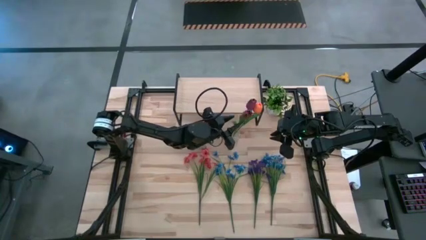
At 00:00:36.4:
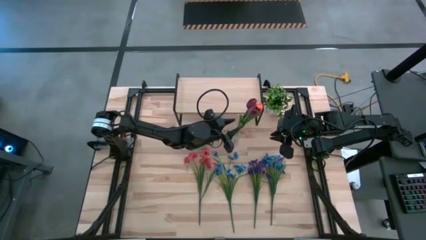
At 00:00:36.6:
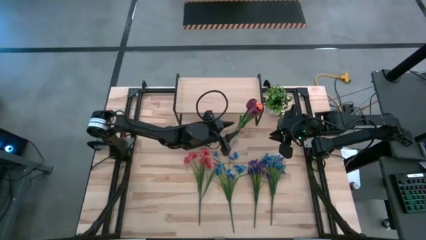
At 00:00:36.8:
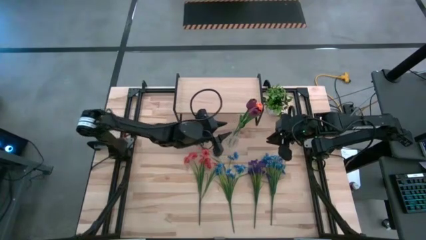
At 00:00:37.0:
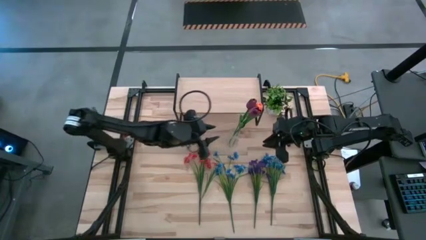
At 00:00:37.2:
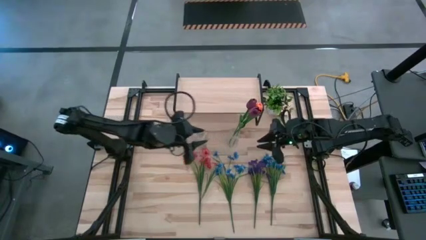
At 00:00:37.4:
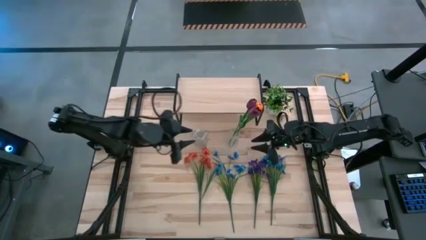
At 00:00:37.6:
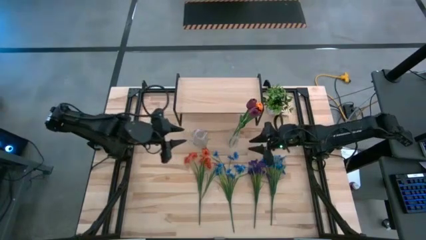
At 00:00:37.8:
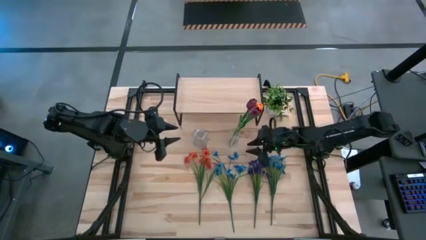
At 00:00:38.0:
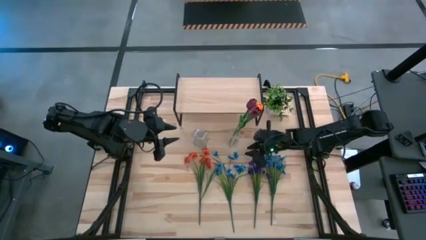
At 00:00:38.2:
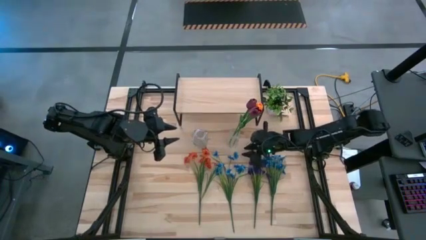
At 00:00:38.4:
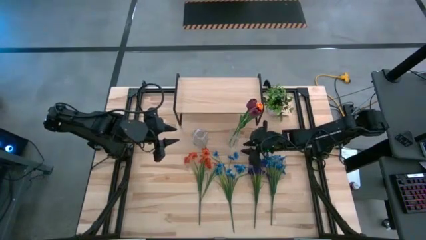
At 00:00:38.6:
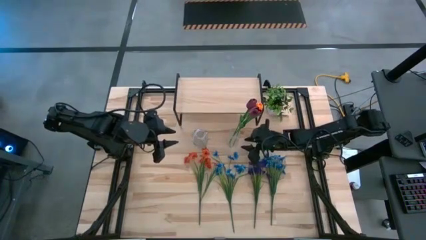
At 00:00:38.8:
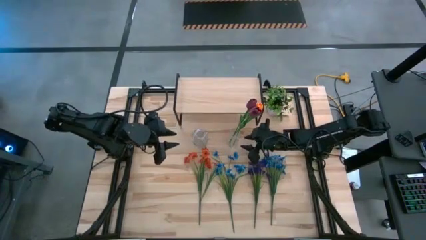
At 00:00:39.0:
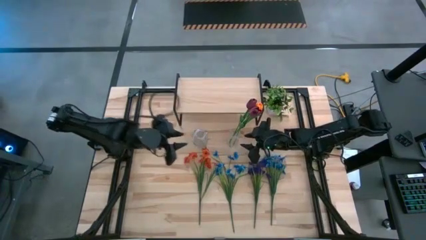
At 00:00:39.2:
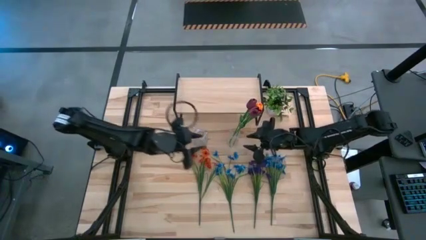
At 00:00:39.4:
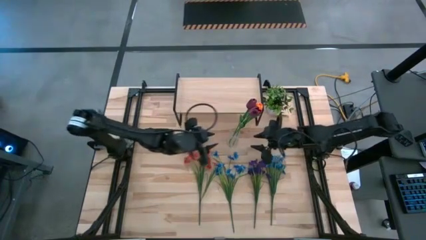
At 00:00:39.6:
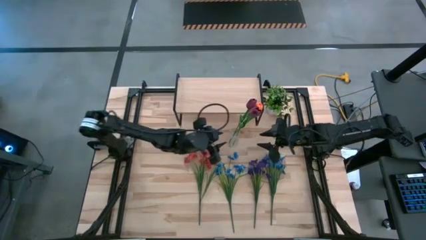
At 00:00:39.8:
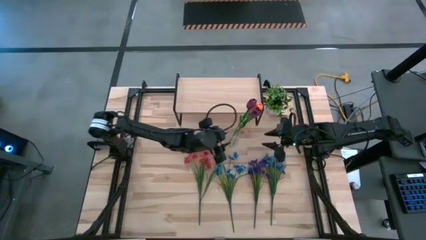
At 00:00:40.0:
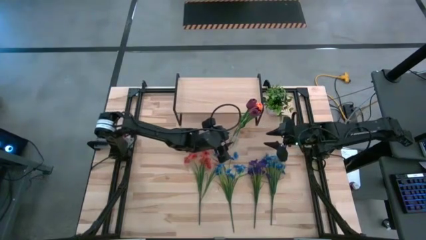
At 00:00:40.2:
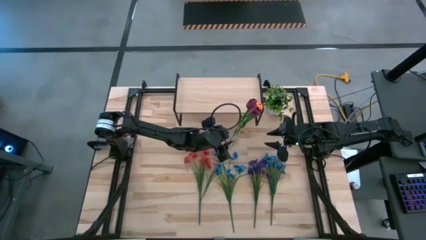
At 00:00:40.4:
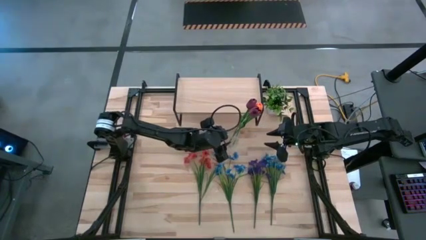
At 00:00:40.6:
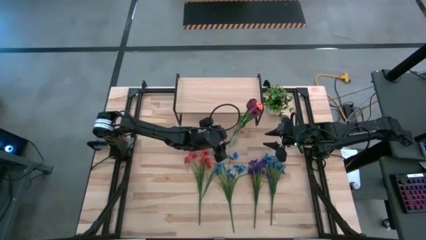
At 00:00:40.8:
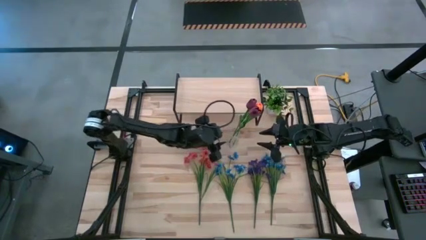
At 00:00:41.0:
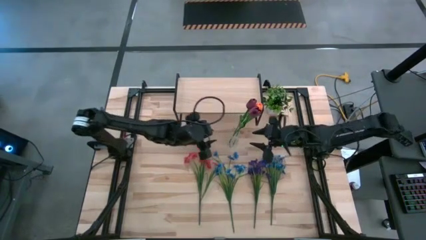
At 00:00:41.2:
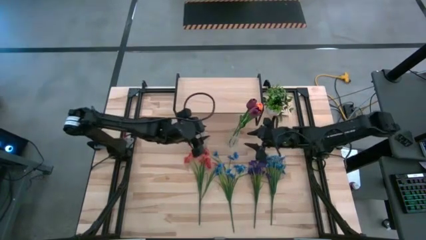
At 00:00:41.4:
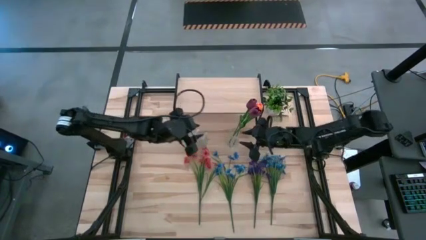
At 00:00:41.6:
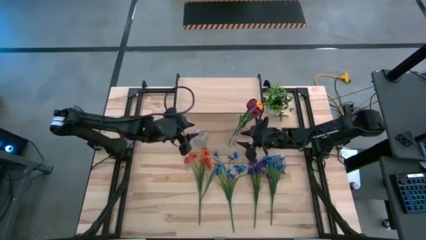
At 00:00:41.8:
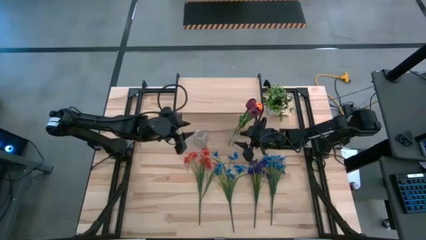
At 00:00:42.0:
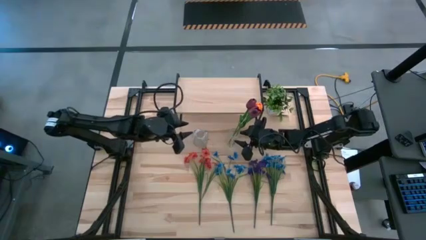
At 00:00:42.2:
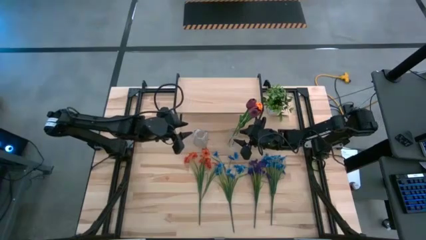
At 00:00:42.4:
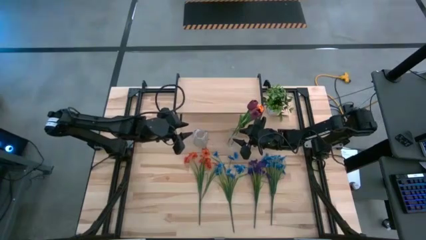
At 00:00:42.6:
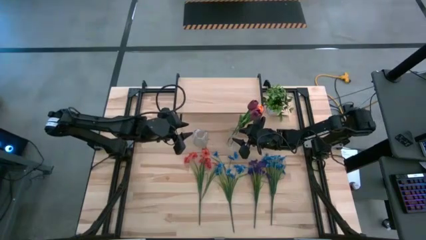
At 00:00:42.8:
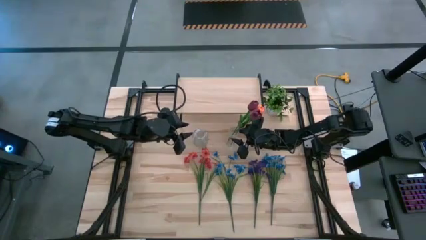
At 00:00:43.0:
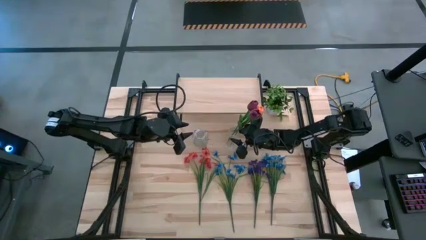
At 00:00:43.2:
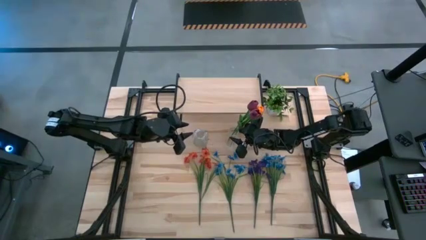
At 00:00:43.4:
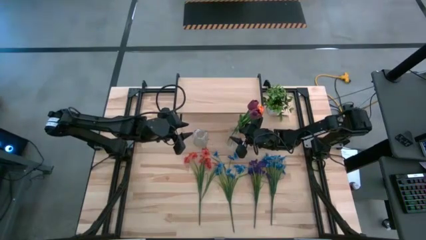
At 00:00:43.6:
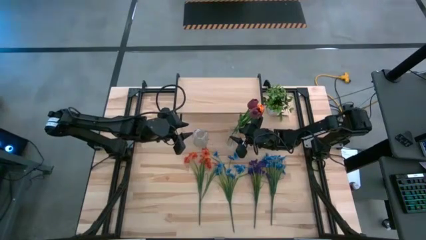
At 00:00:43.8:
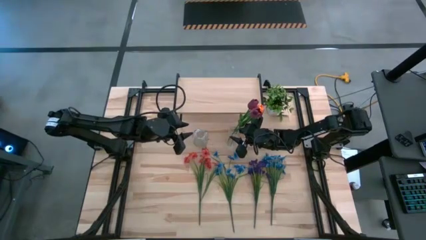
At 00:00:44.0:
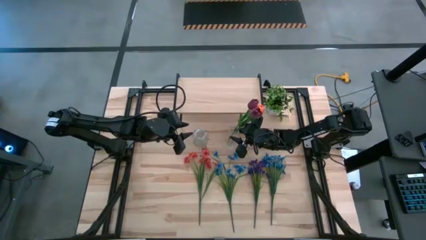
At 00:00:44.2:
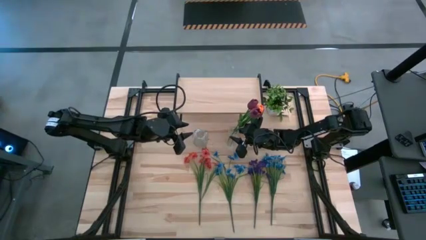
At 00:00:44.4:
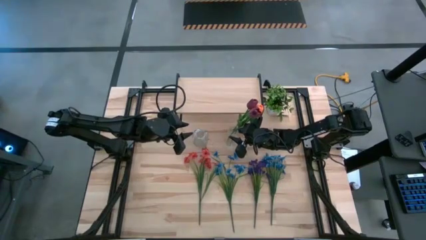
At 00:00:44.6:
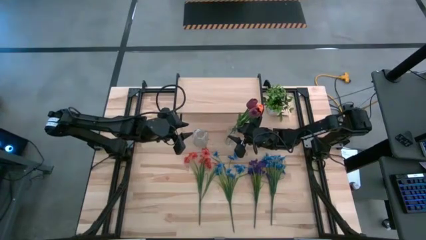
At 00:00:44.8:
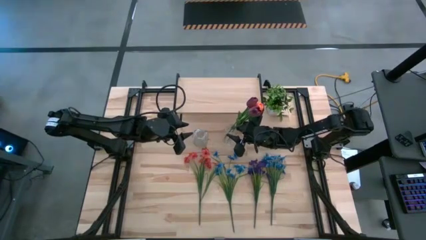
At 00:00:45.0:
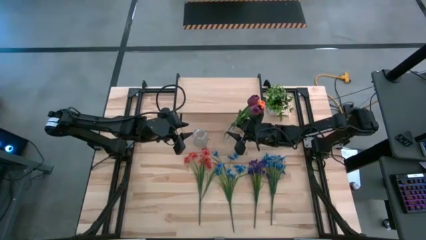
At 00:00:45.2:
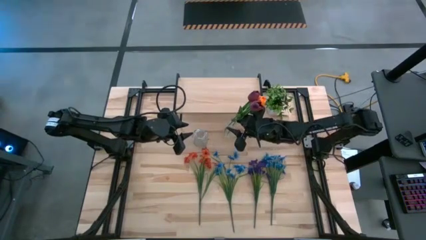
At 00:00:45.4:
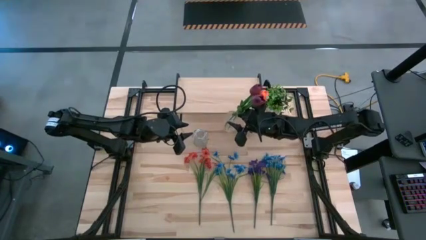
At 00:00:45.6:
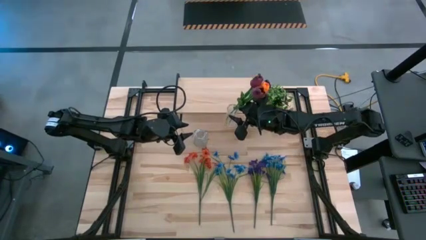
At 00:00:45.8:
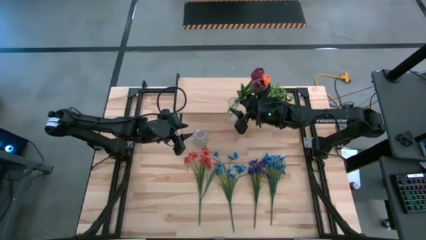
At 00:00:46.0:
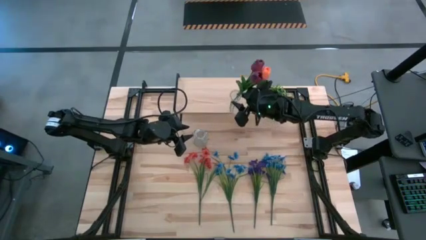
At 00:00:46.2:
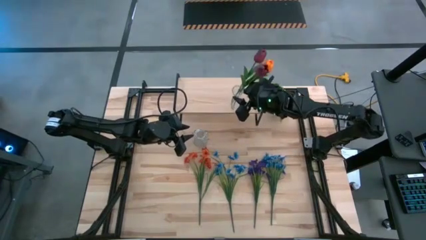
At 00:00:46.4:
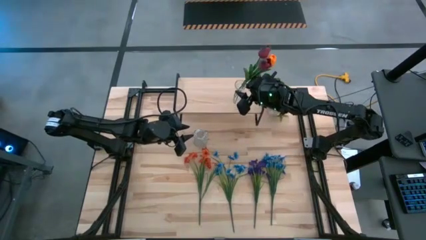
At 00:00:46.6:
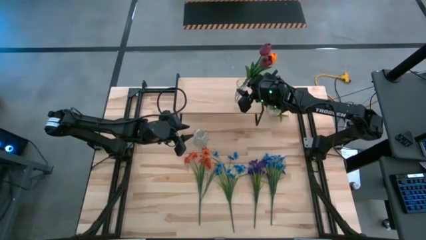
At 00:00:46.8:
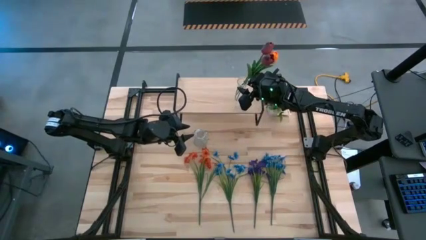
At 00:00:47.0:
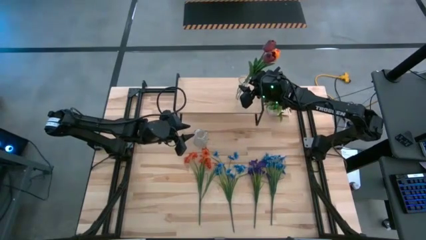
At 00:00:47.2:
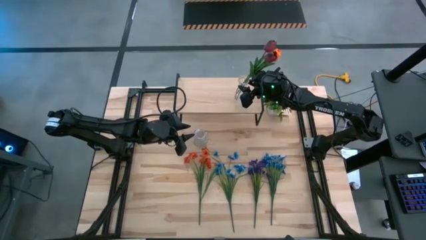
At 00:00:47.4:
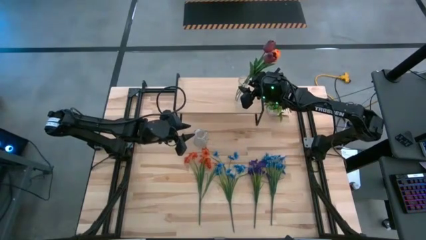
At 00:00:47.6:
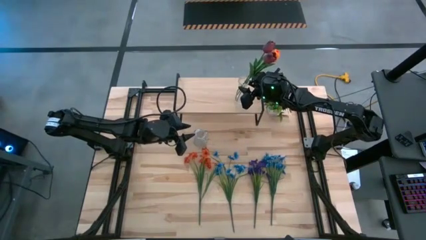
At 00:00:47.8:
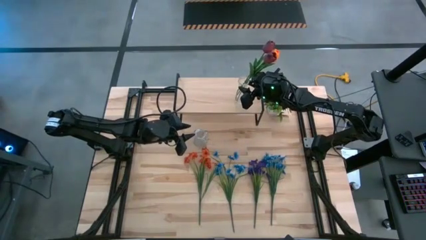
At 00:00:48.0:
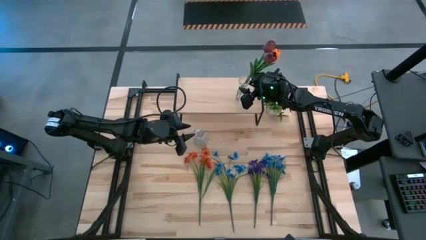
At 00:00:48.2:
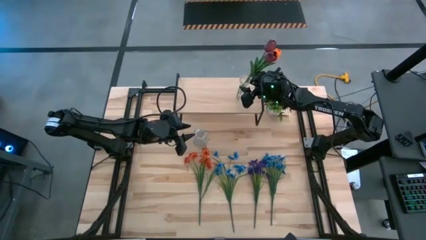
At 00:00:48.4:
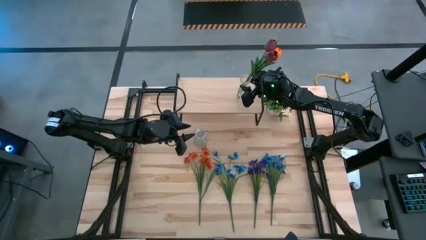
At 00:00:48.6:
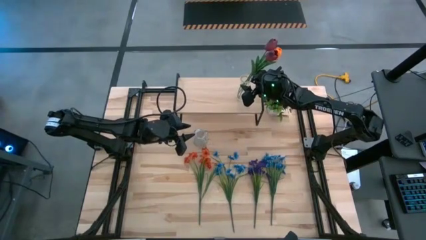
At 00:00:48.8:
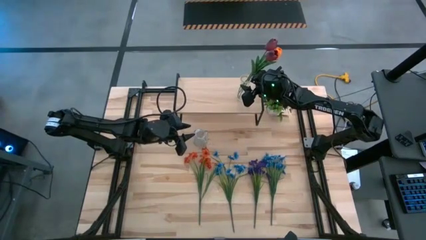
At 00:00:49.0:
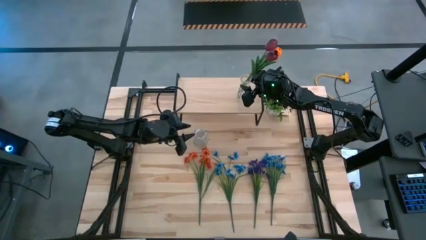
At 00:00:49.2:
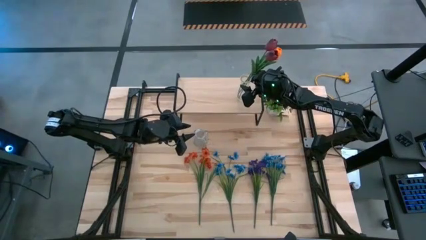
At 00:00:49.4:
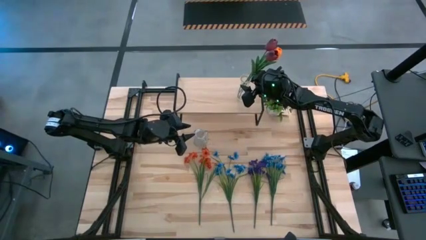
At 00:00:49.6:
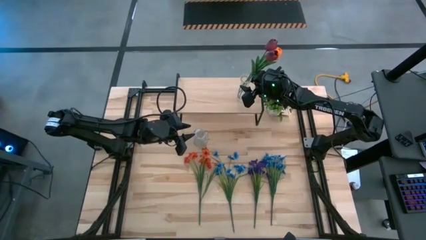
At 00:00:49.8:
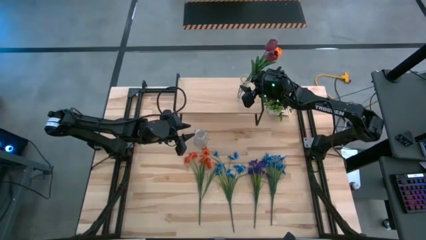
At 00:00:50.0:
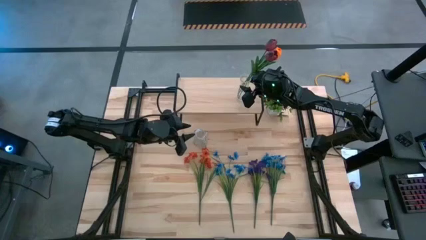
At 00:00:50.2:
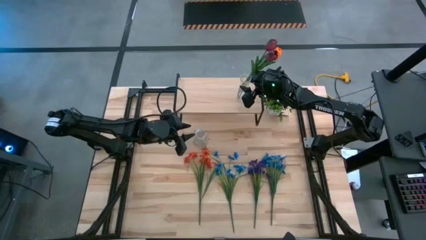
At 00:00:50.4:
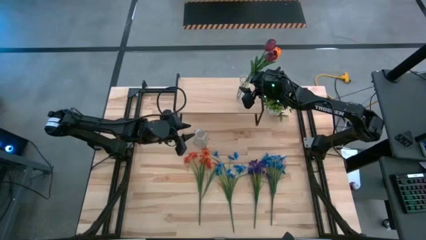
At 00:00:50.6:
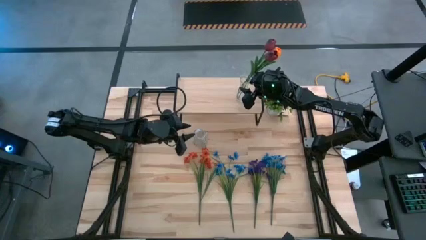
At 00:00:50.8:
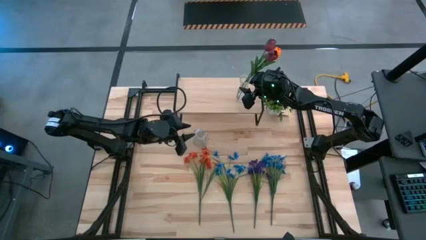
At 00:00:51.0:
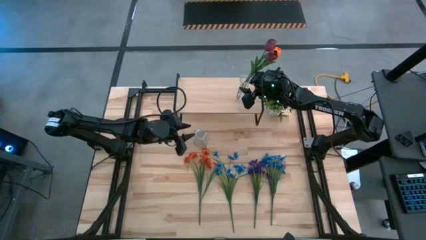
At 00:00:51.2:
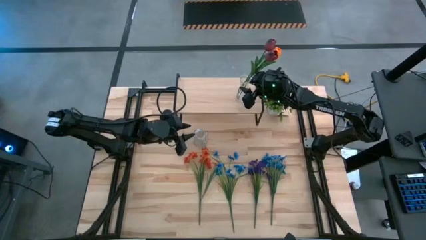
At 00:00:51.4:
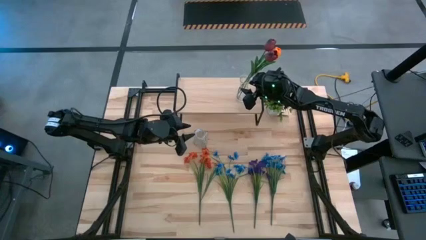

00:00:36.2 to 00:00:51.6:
Task: Pick and place flowers into a vace then onto a shelf
Put the right transparent vase with flowers on the shelf
